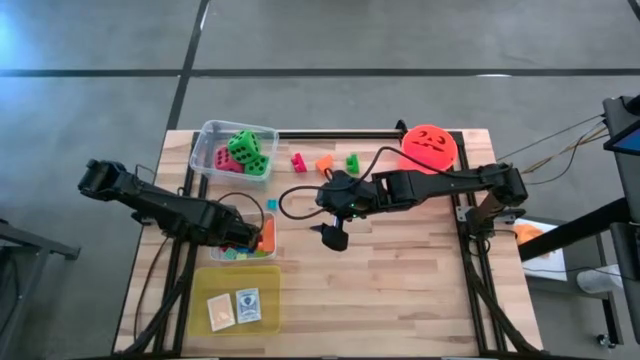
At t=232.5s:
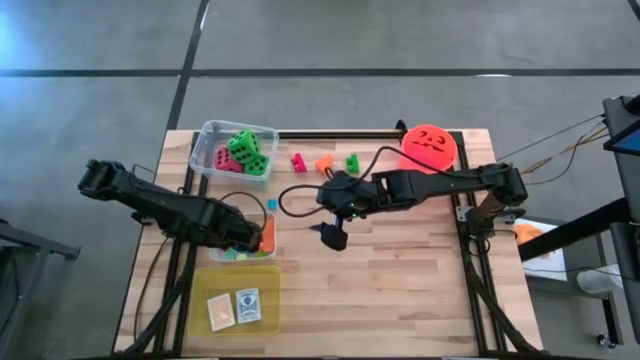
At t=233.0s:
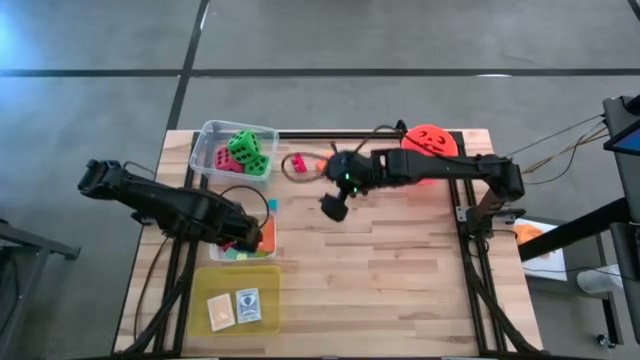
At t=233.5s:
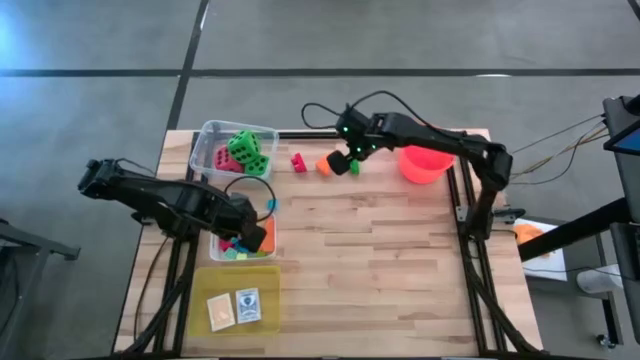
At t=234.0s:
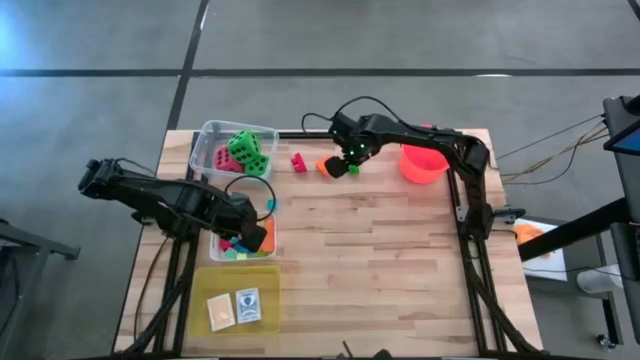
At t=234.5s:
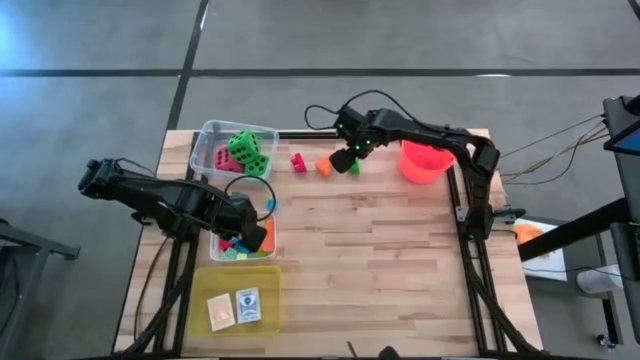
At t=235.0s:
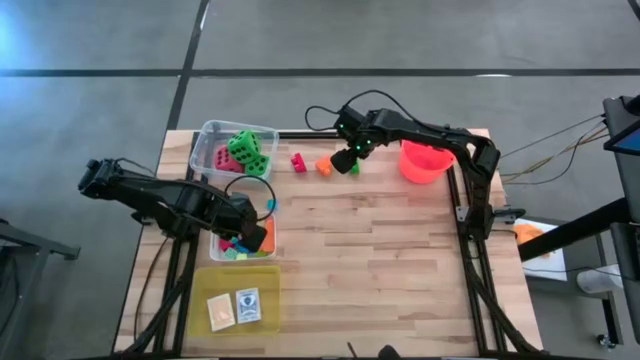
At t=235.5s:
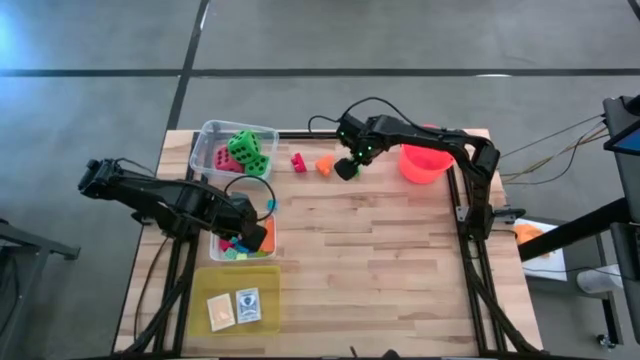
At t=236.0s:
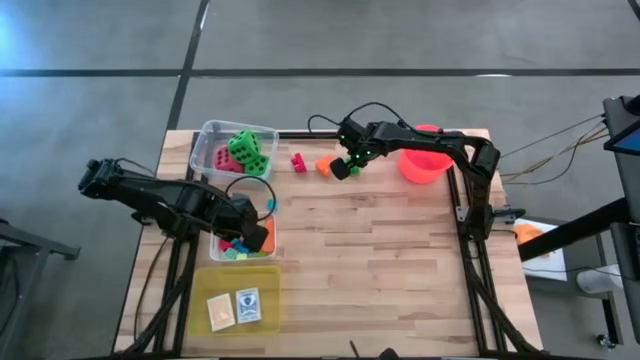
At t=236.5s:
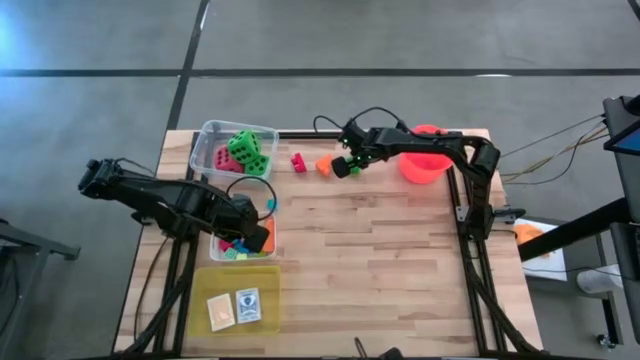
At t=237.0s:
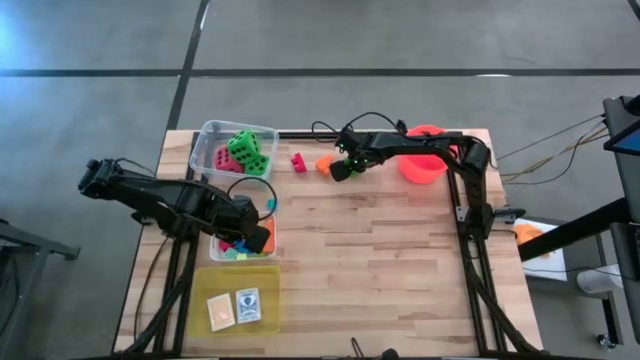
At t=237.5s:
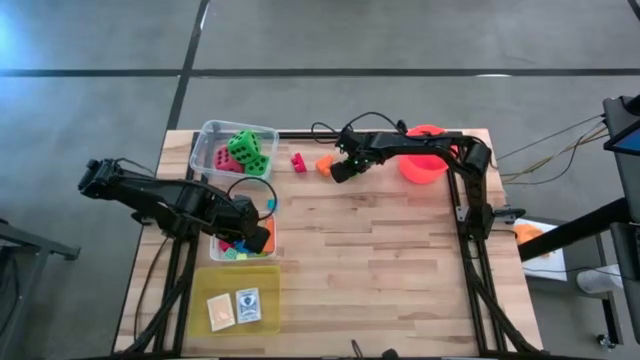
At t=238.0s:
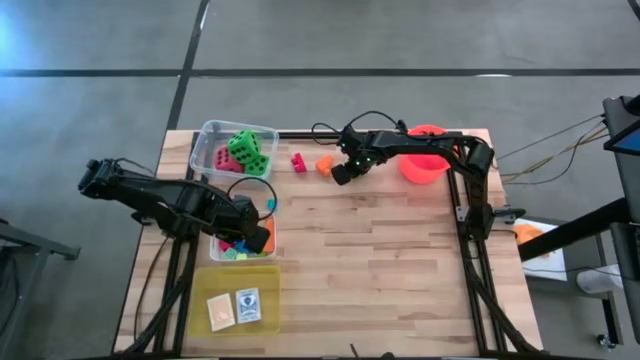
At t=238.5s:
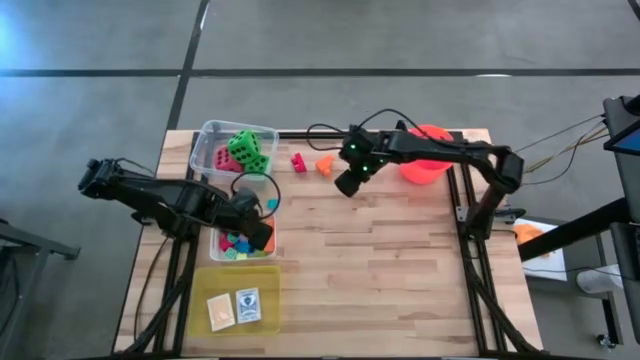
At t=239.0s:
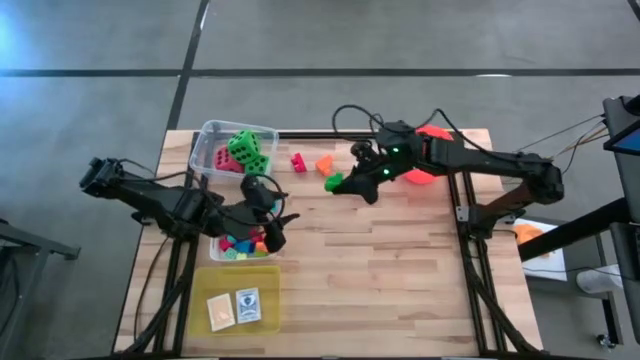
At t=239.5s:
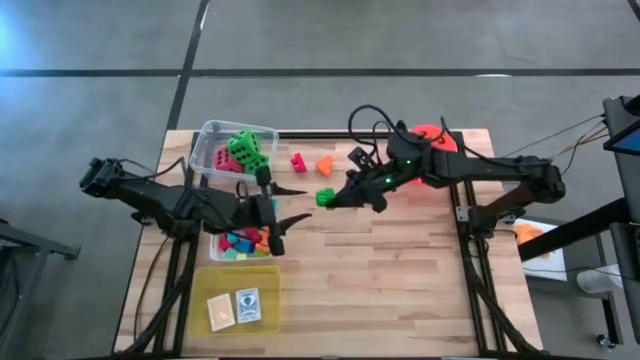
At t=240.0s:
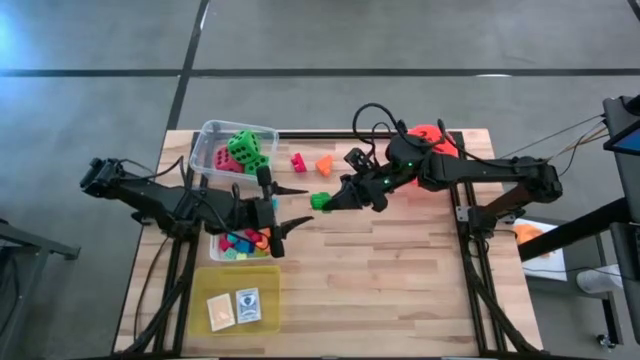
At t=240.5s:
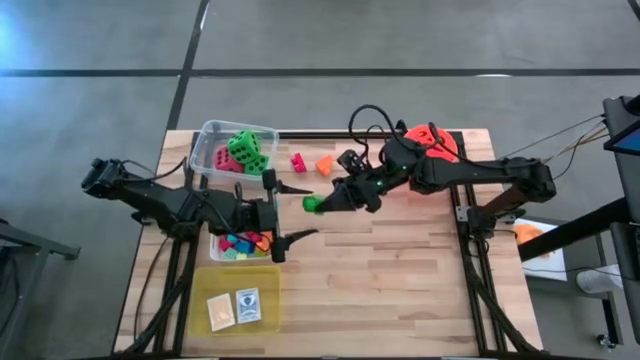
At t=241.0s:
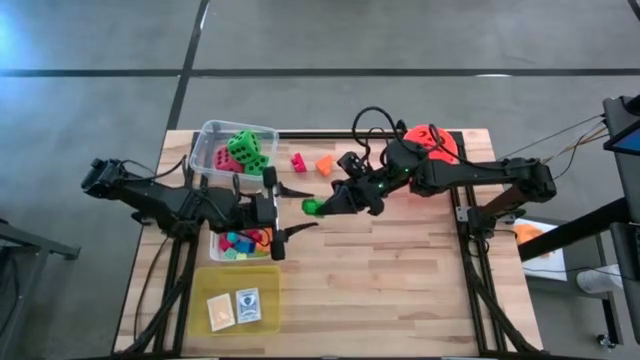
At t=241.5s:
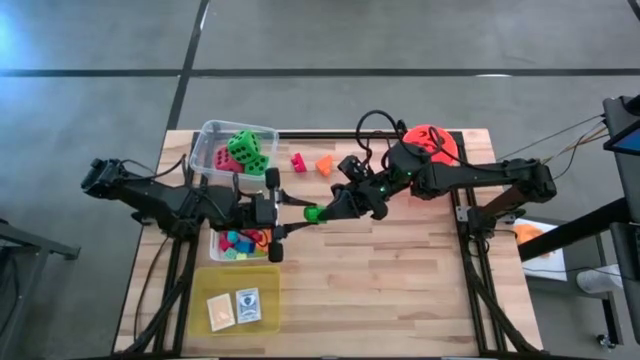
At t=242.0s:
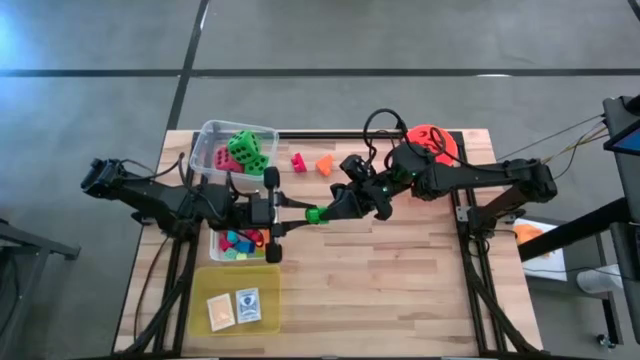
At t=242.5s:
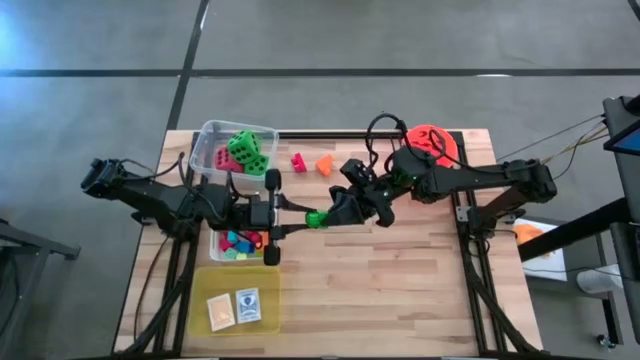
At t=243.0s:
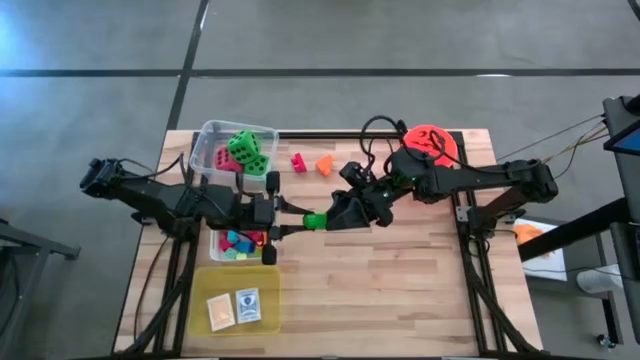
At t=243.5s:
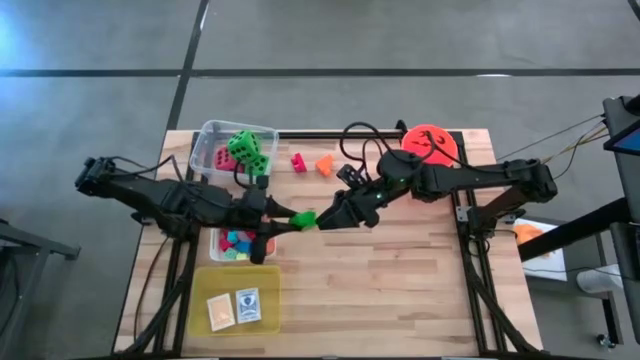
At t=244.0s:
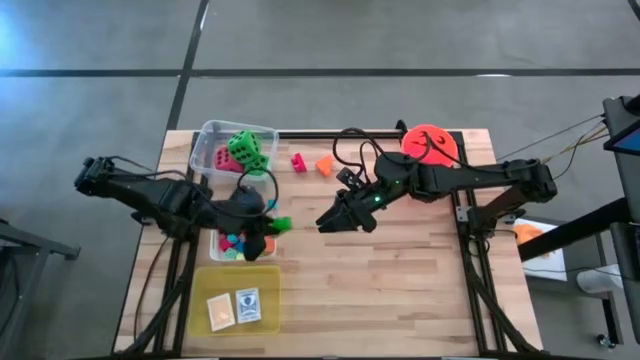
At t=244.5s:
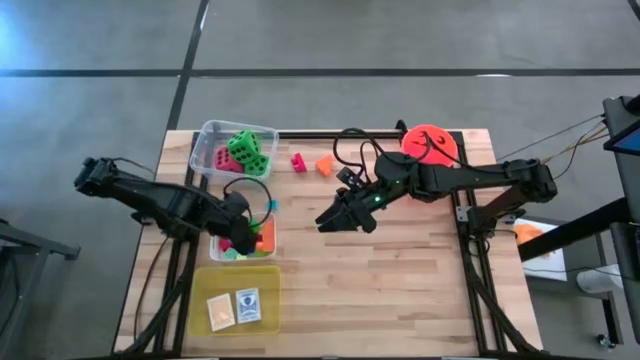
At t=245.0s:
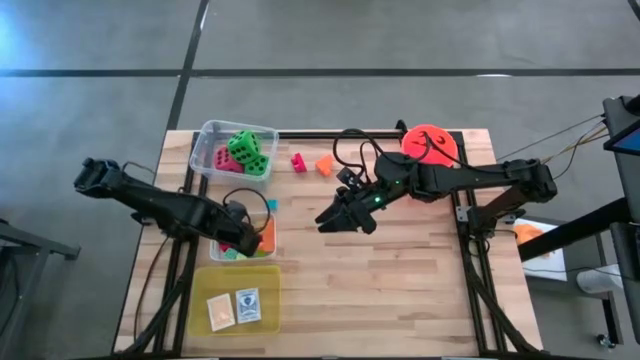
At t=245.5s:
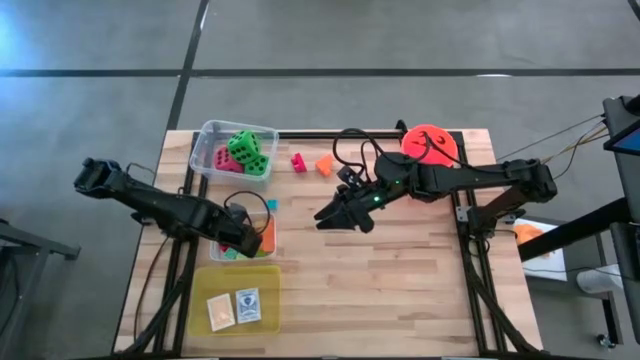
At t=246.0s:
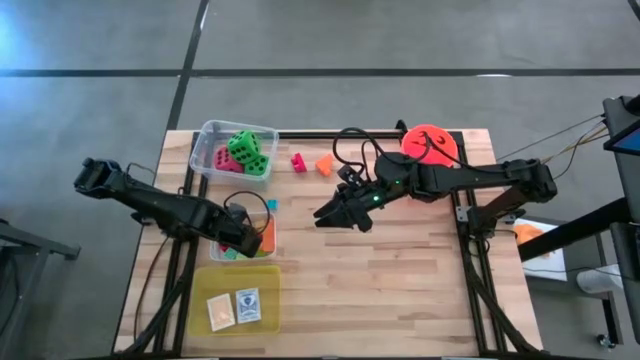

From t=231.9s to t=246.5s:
Task: Pick & Place Toys
Put the dark green game piece into the white bin

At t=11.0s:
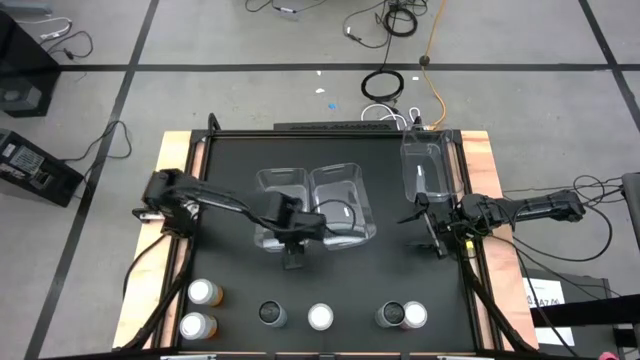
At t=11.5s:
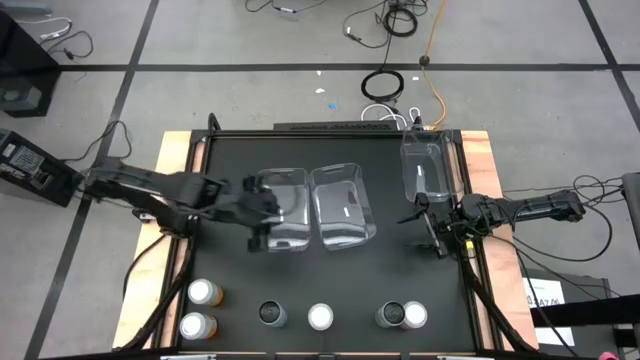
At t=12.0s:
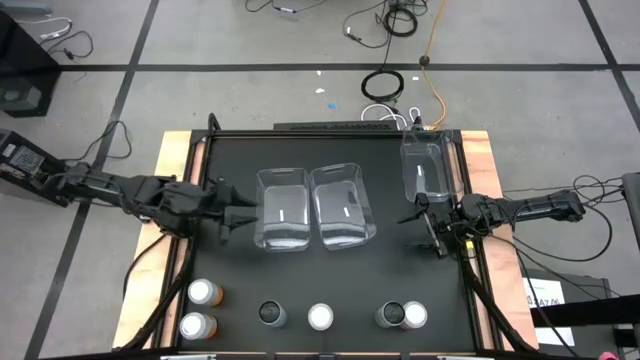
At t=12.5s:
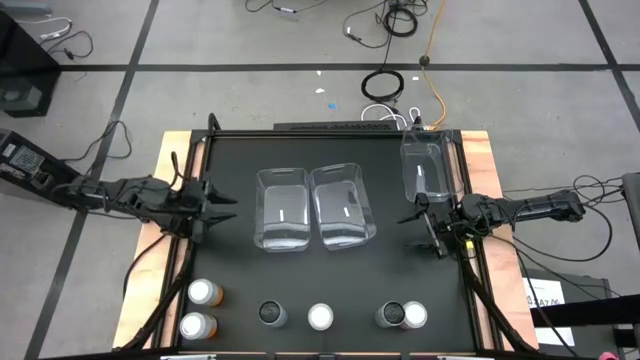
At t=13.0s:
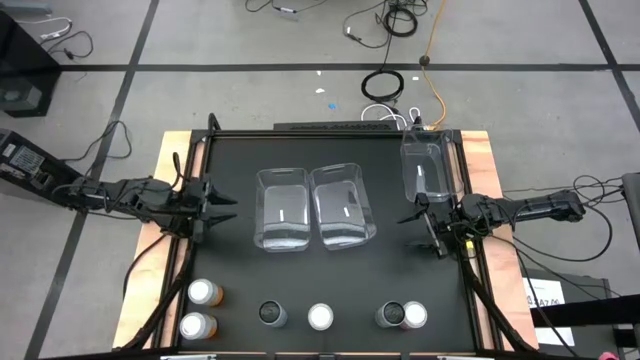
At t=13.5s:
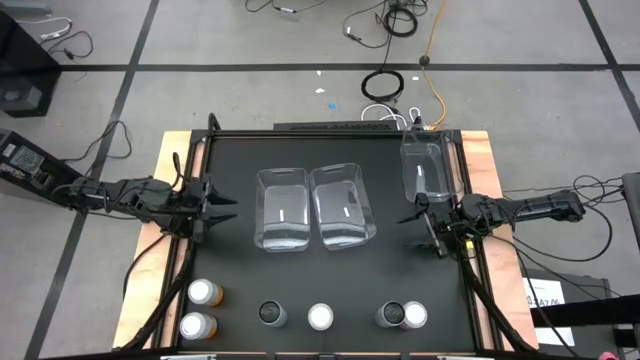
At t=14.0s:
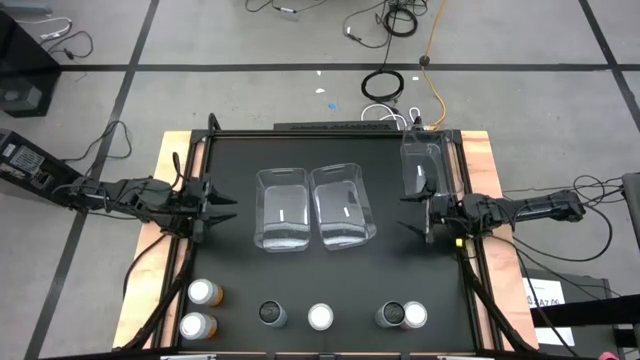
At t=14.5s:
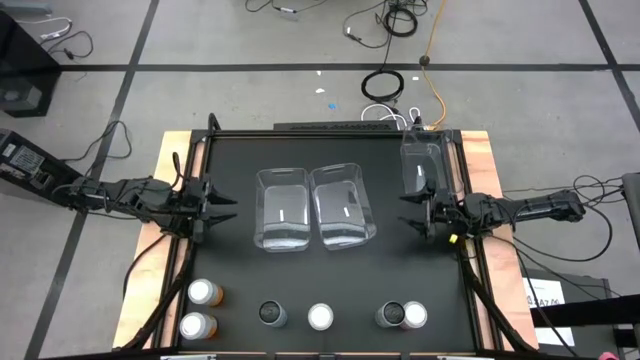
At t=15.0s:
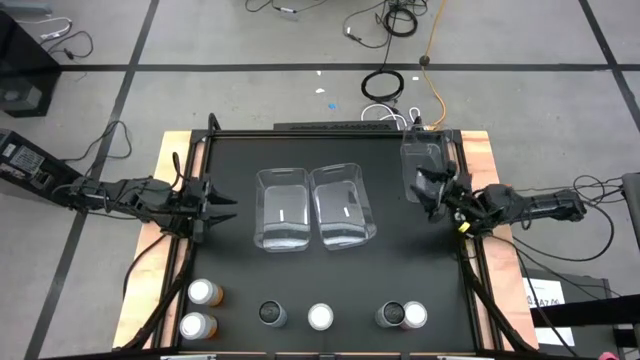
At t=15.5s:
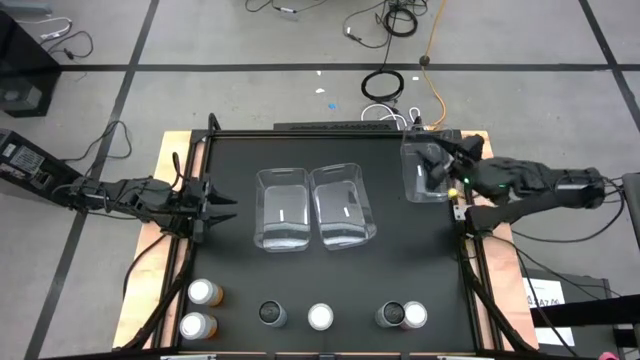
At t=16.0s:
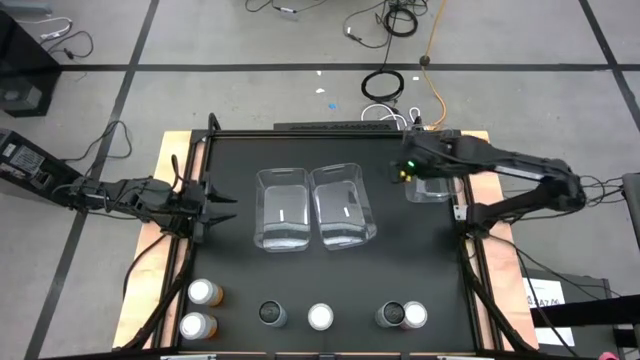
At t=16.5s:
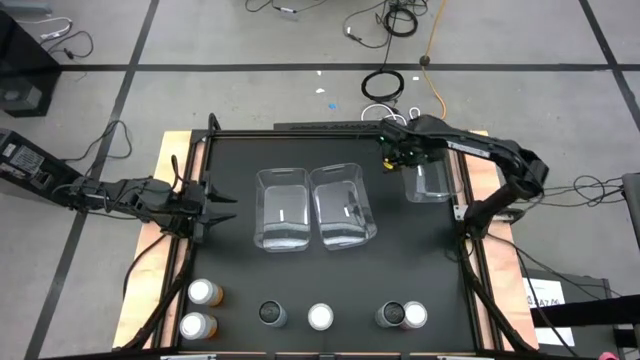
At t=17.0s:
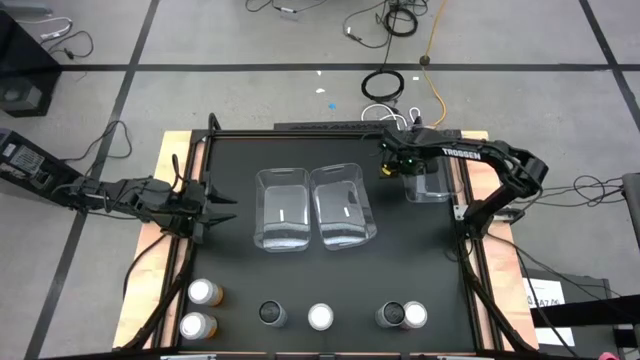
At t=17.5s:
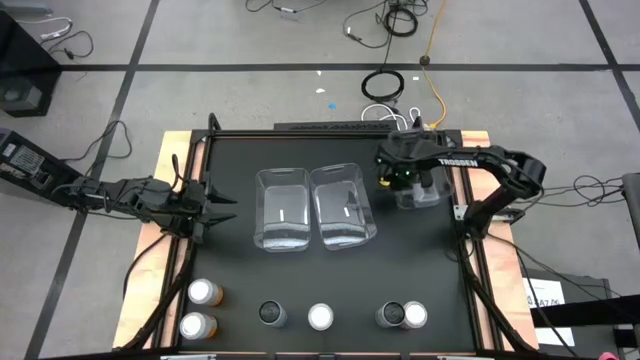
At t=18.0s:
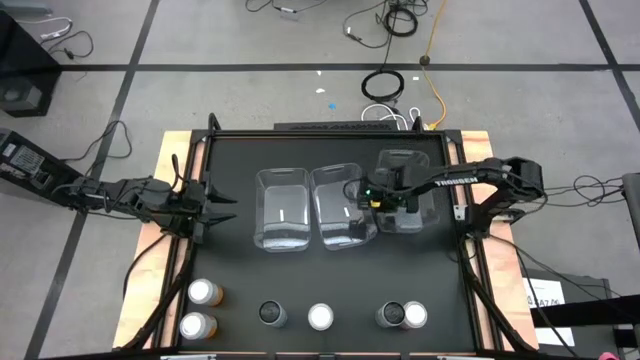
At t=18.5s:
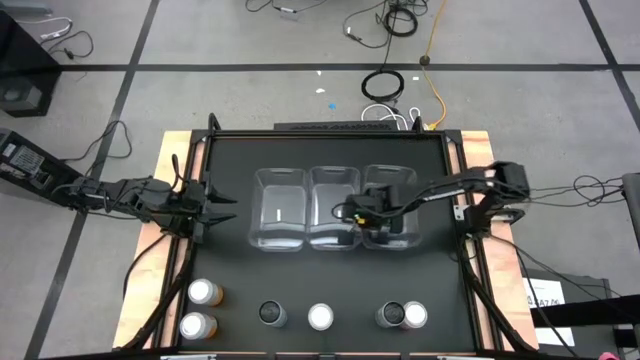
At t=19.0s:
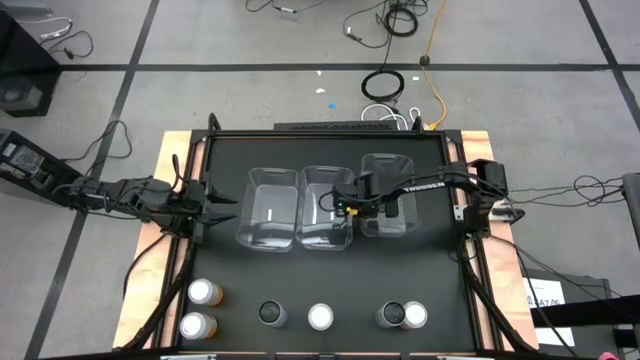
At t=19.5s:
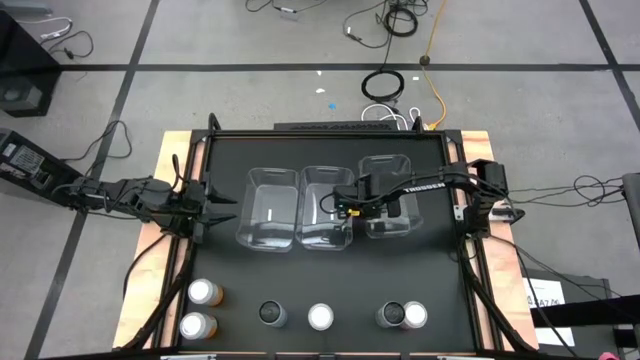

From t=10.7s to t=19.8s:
Task: Sort soda cans
Move the right transparent bin to the center of the table
